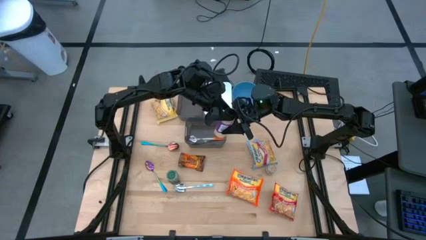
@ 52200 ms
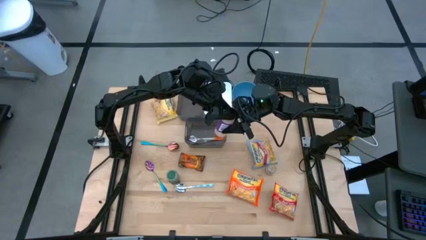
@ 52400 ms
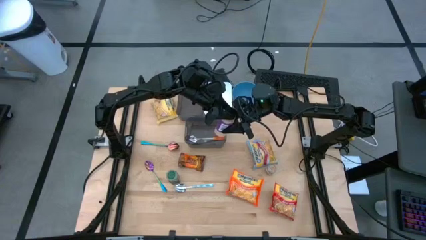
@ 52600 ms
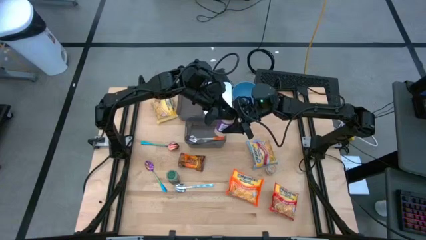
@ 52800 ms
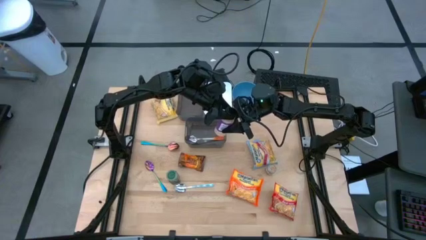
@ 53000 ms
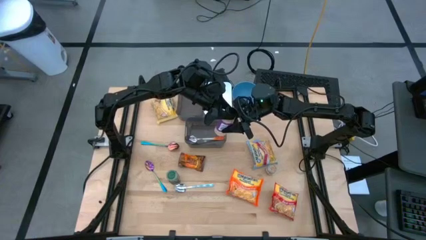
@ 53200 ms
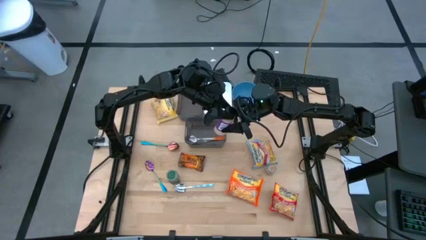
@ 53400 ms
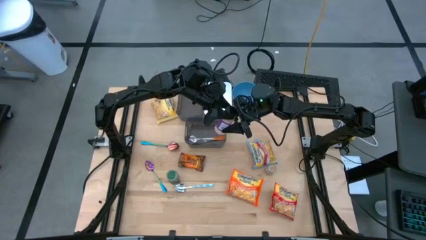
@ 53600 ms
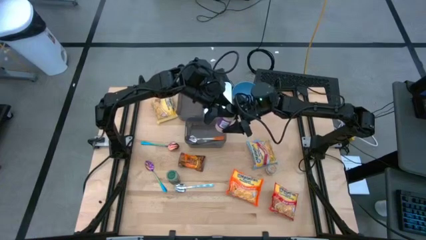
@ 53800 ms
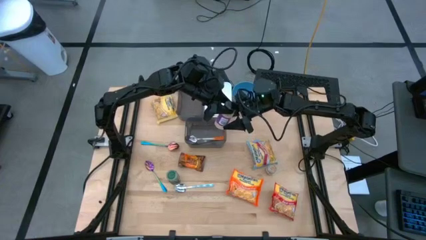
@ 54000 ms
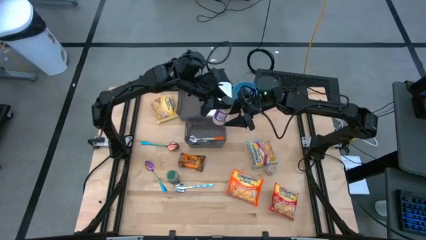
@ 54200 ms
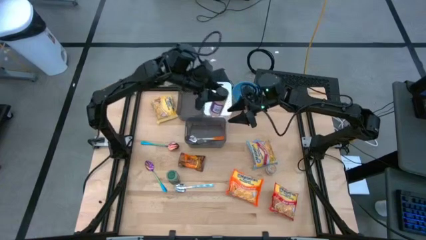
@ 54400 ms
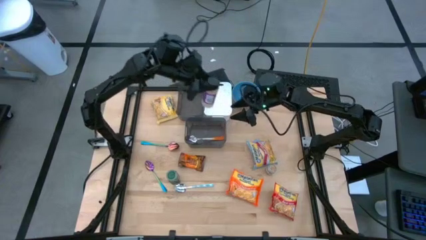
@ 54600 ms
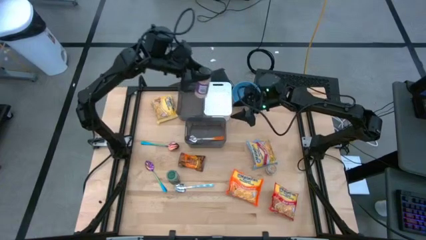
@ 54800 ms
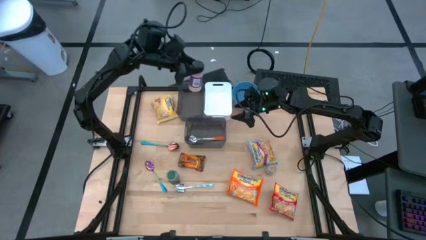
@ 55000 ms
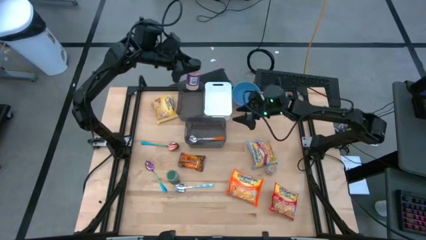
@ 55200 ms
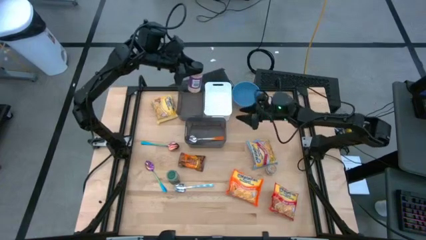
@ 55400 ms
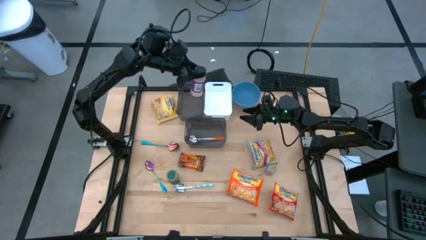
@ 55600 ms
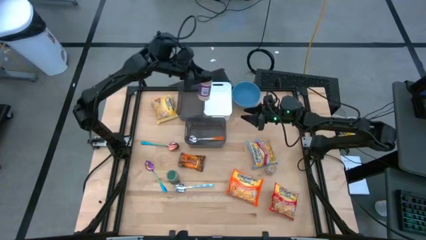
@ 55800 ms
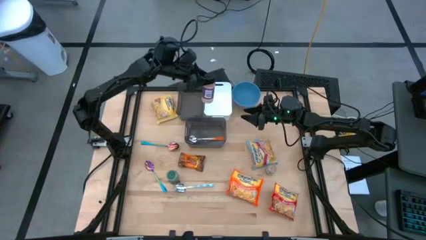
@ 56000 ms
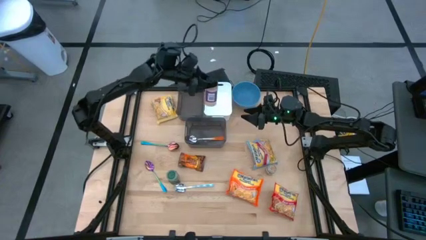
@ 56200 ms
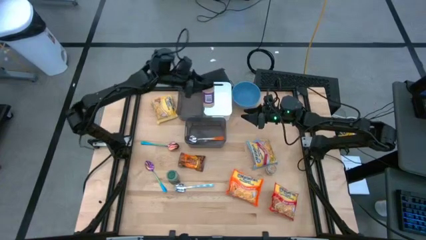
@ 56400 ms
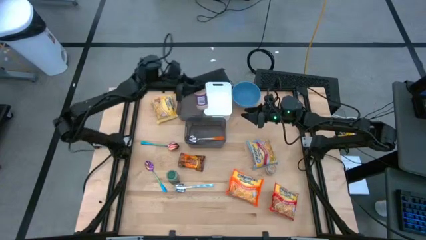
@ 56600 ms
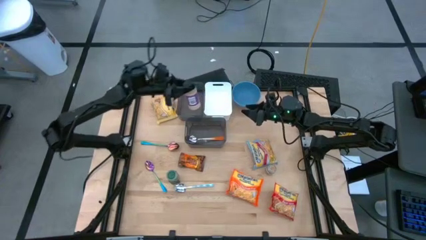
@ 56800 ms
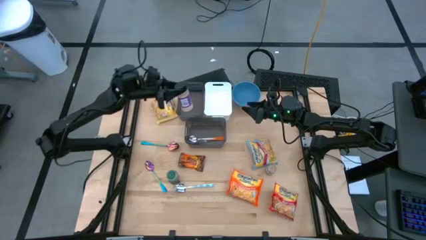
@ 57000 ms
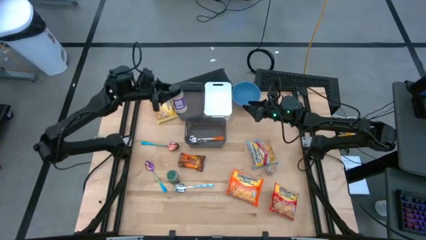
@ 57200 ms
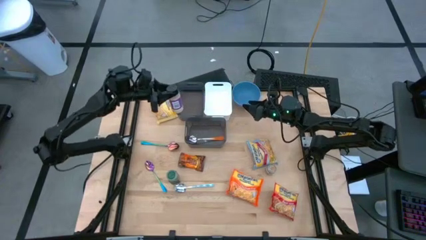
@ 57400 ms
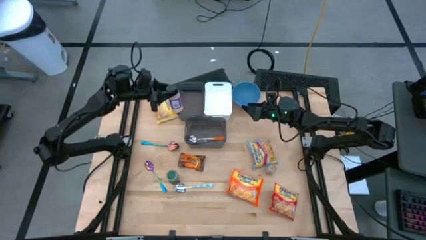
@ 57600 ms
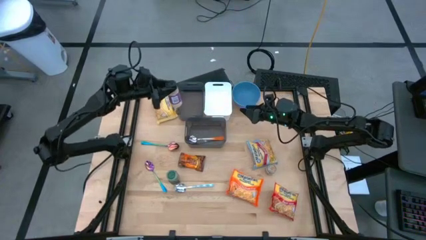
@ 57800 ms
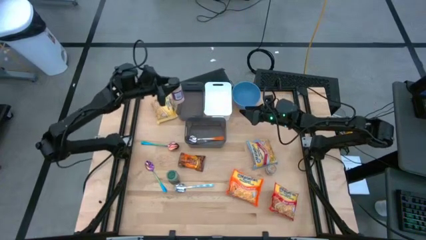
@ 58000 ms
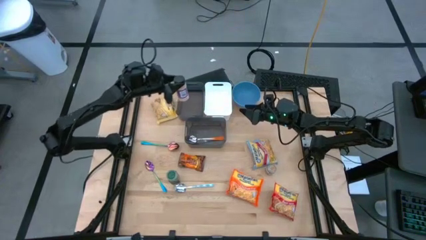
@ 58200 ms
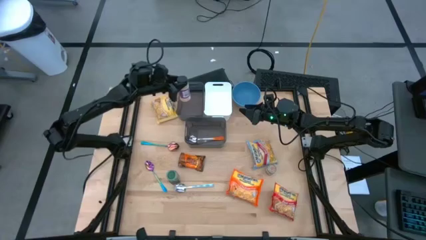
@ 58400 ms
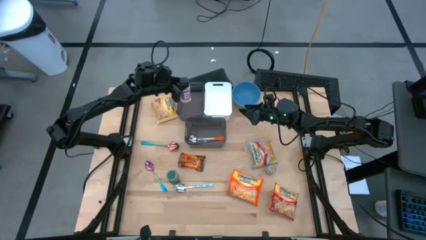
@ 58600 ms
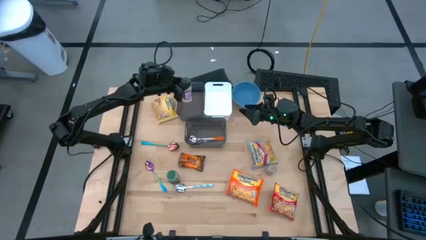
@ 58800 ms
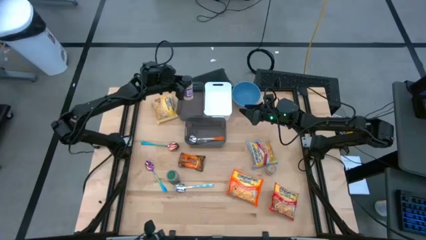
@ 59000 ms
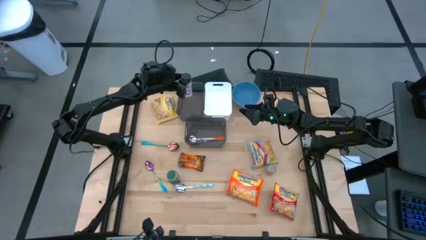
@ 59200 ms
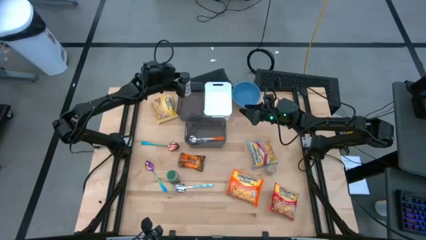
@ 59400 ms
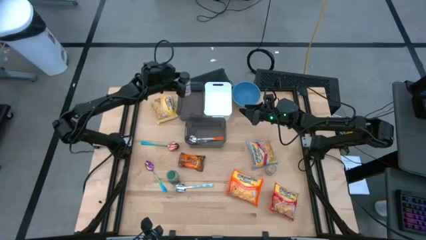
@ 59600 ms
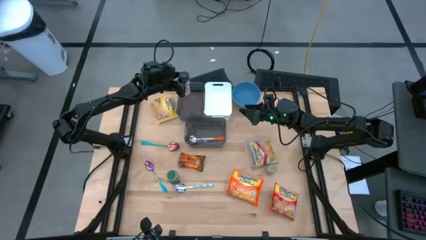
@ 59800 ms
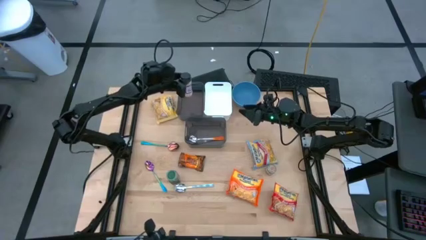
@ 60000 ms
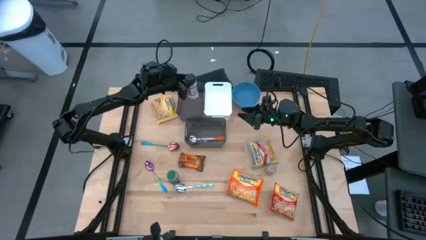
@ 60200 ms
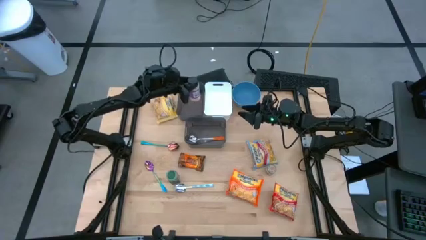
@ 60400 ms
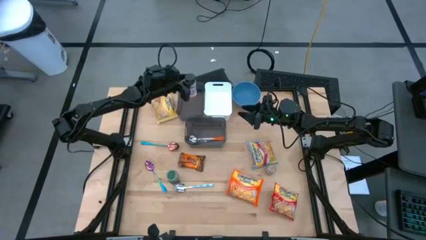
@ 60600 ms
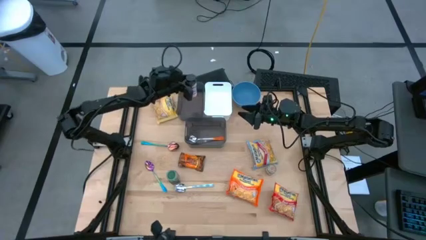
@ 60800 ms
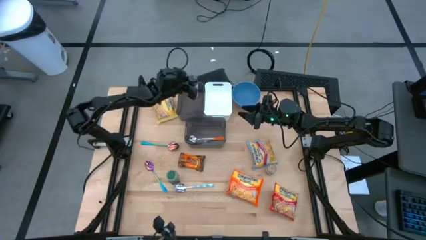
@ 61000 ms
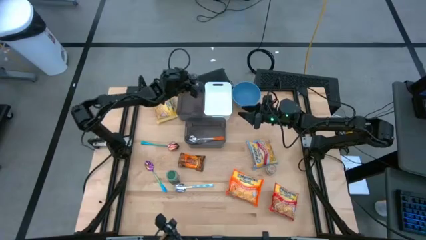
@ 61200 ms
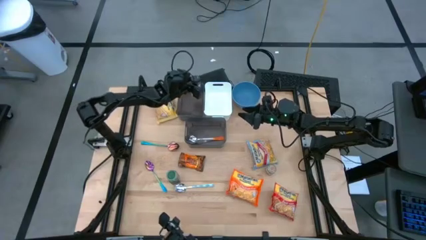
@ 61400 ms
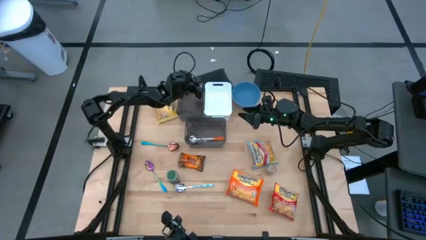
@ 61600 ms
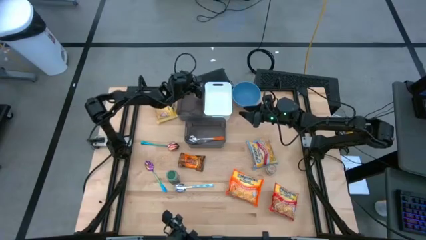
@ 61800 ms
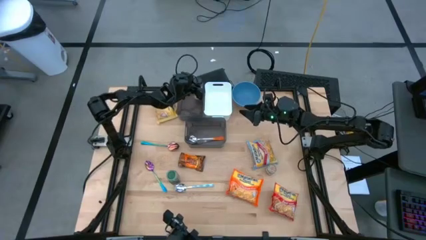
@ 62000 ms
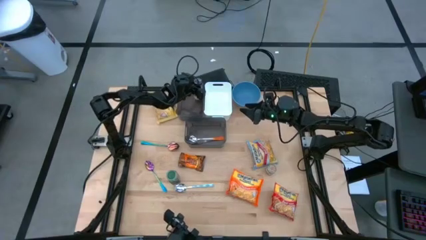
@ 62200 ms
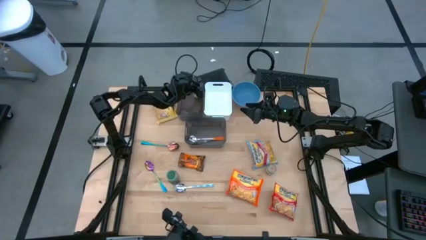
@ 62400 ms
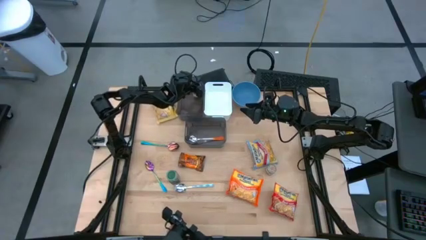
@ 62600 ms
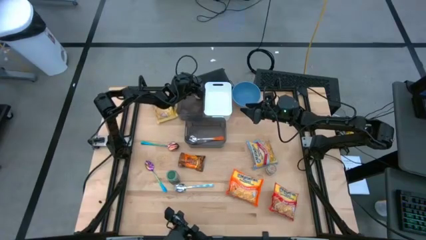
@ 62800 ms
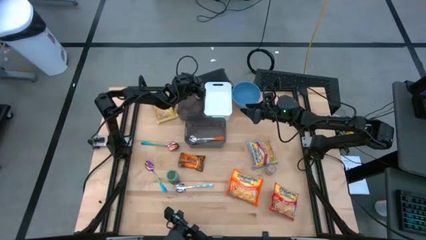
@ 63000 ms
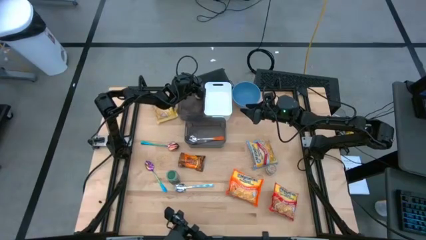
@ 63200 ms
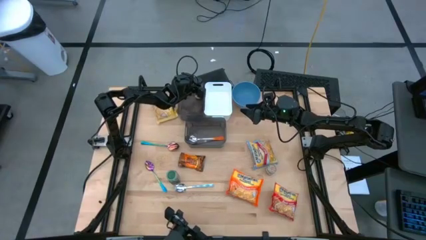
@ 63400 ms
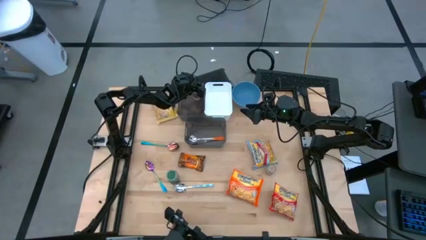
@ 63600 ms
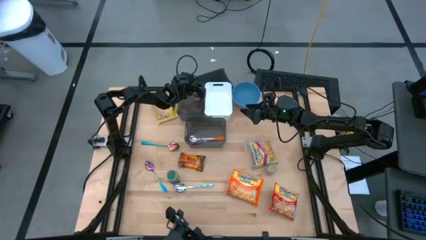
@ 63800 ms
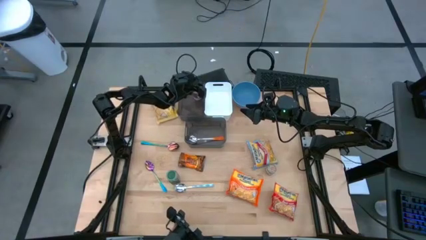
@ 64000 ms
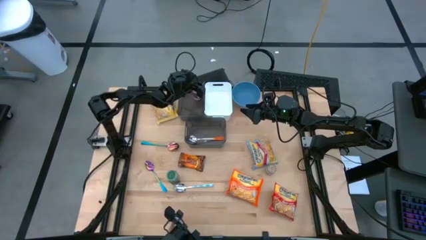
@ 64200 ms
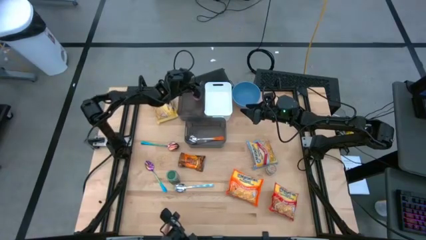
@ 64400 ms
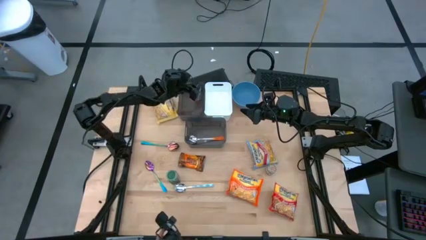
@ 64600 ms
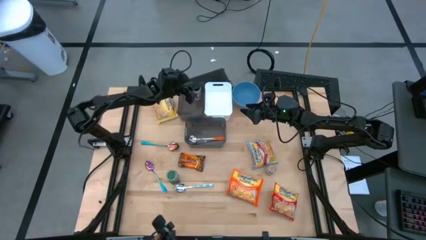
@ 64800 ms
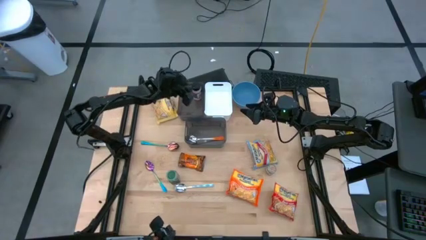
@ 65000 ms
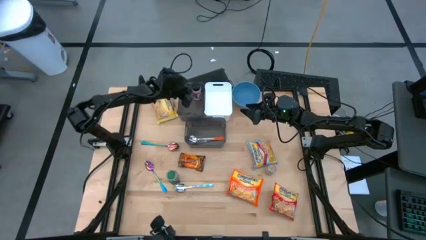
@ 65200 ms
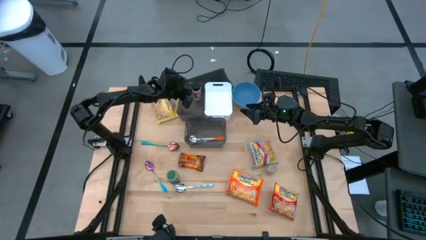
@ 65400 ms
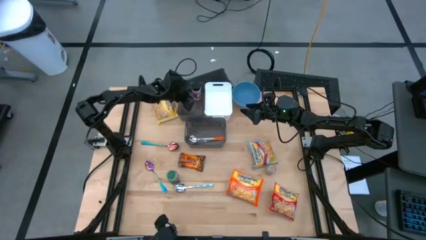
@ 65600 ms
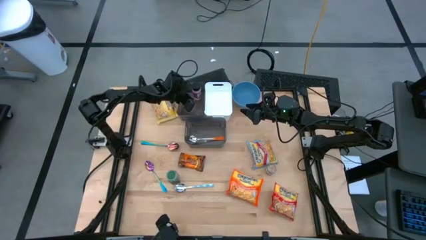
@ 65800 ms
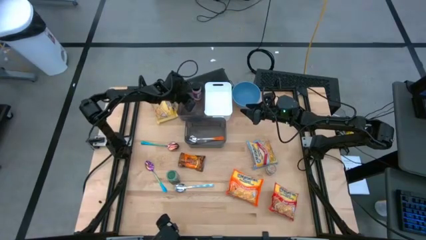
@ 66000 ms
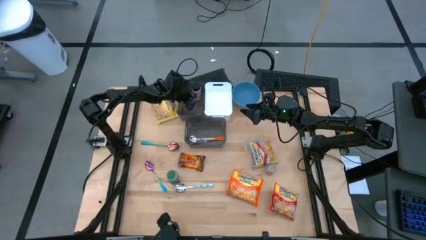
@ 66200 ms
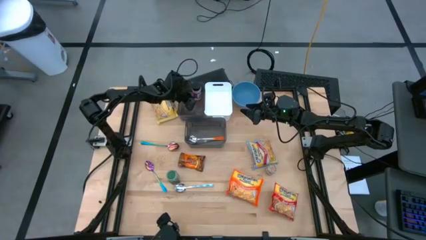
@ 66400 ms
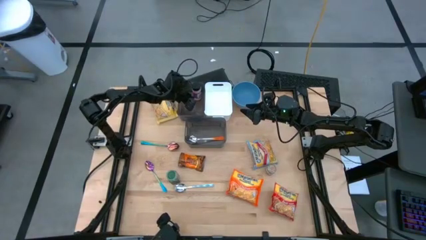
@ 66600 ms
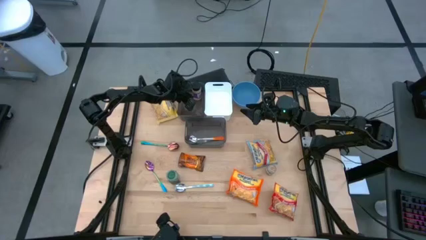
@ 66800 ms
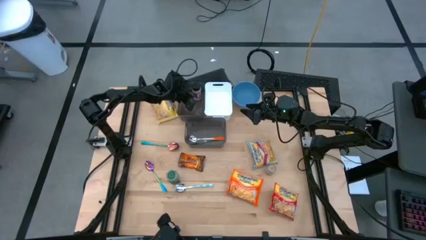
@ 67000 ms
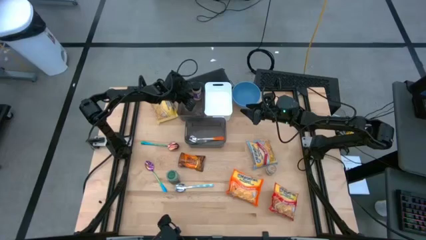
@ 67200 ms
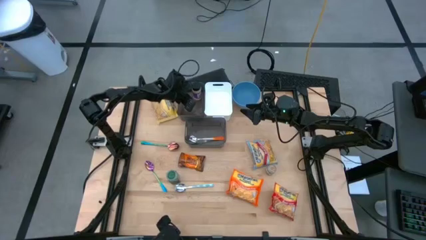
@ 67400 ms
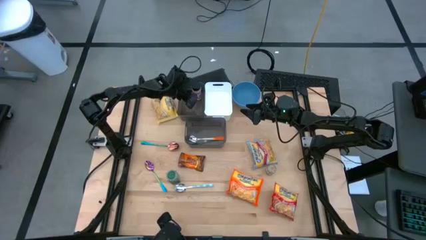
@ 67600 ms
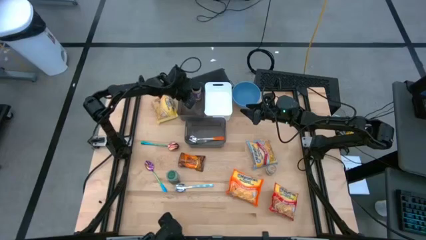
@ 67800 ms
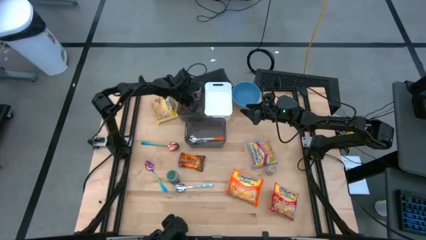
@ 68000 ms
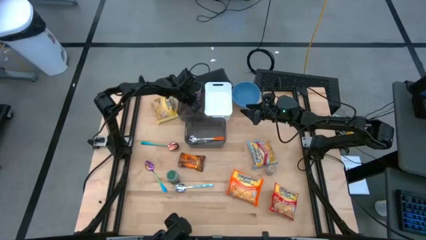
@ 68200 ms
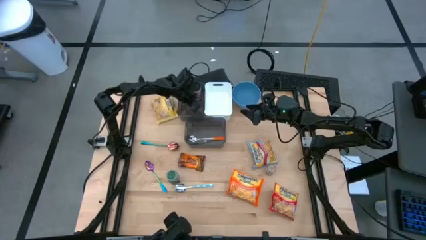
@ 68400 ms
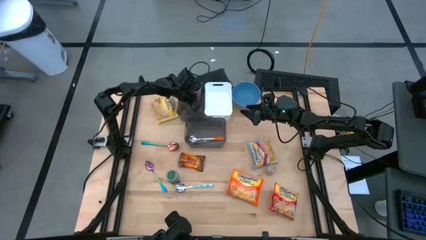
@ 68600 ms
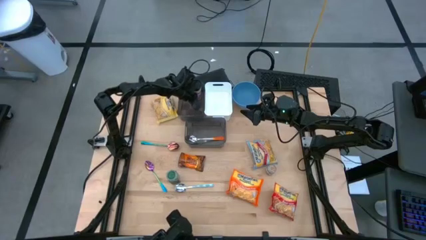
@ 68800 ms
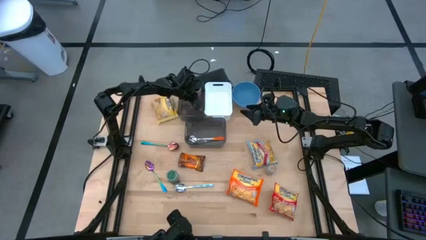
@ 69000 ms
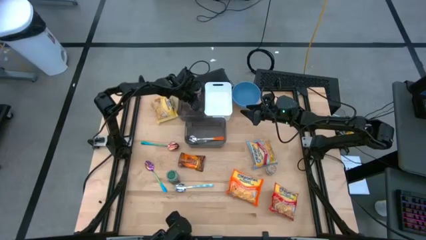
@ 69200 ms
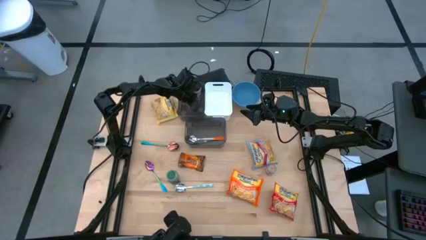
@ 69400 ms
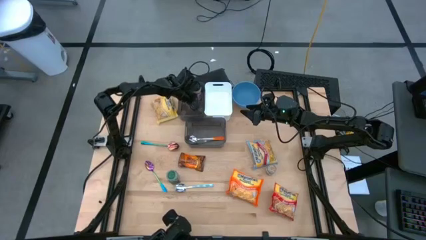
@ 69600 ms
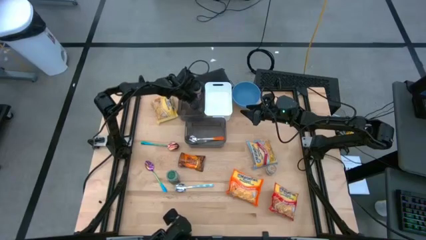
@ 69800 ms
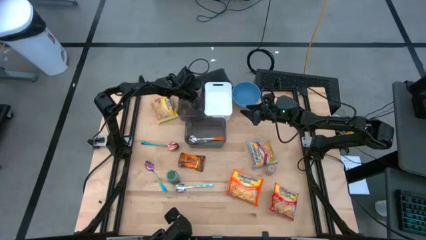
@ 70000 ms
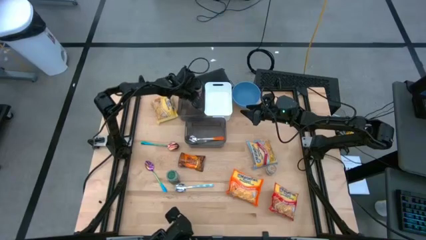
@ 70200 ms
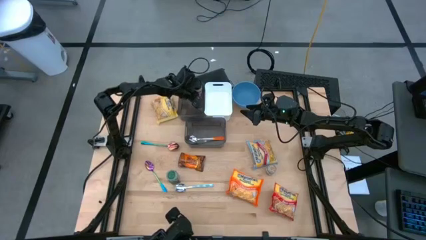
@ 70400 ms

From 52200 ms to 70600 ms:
Task: Pick & Place Food Item
Put the violet seasoning bottle into the top black bin
